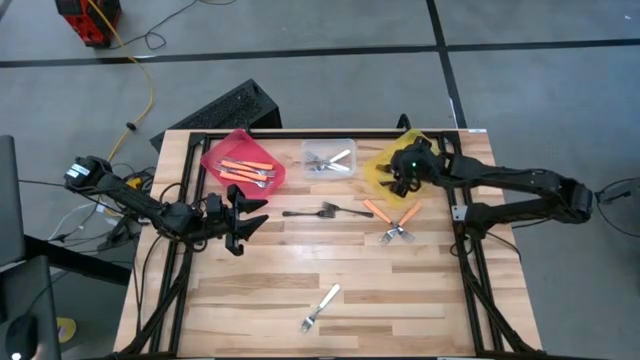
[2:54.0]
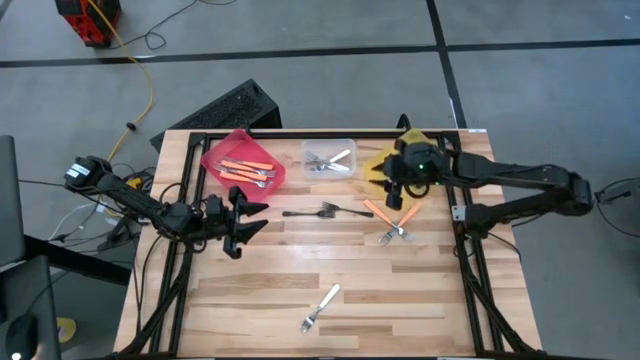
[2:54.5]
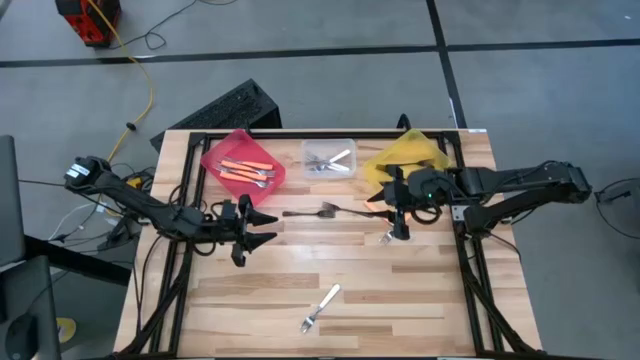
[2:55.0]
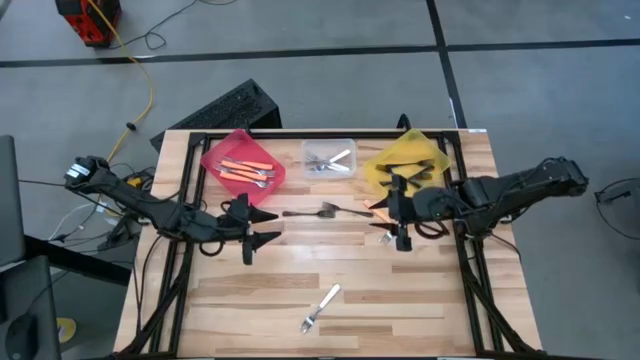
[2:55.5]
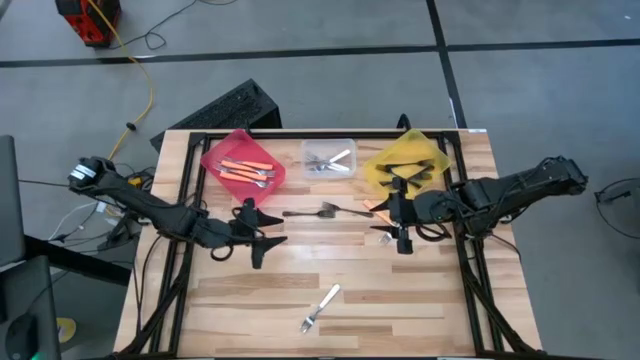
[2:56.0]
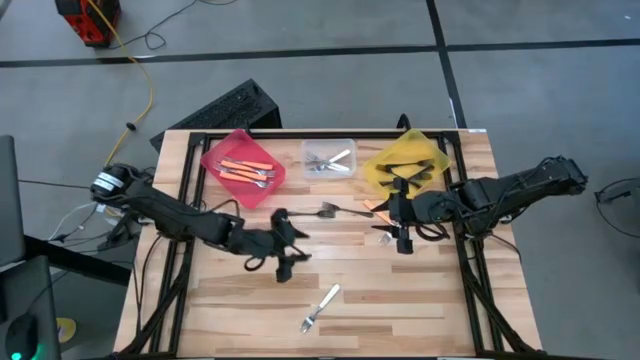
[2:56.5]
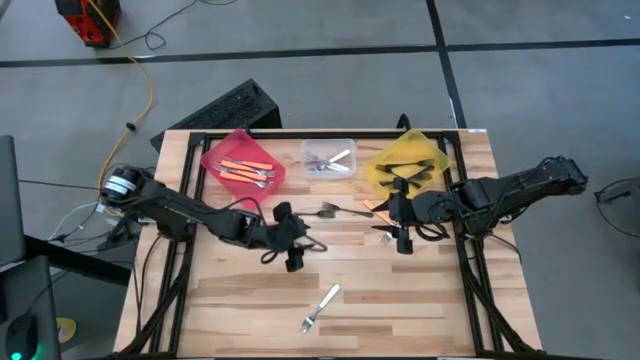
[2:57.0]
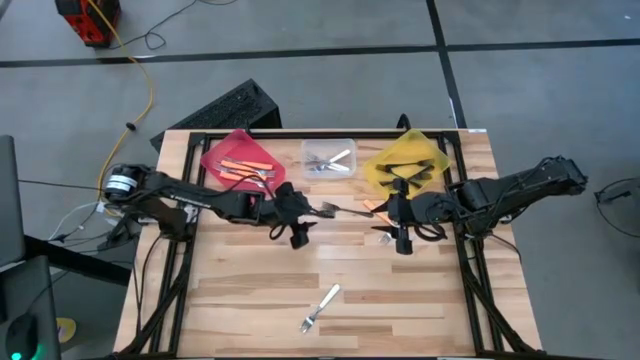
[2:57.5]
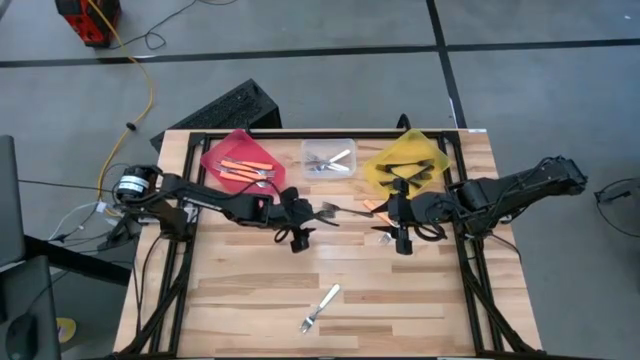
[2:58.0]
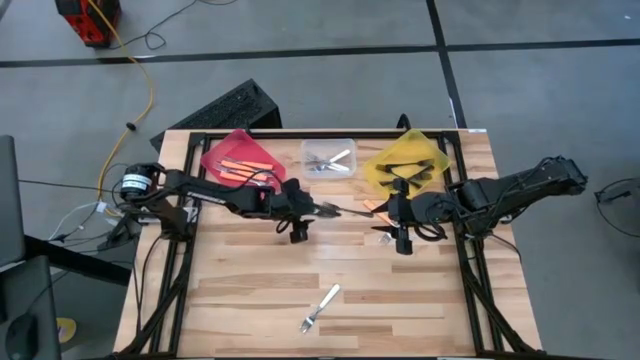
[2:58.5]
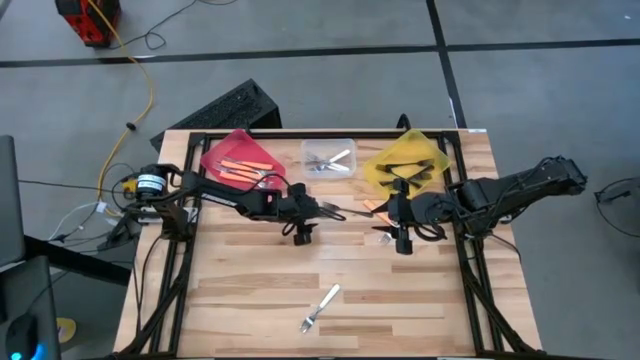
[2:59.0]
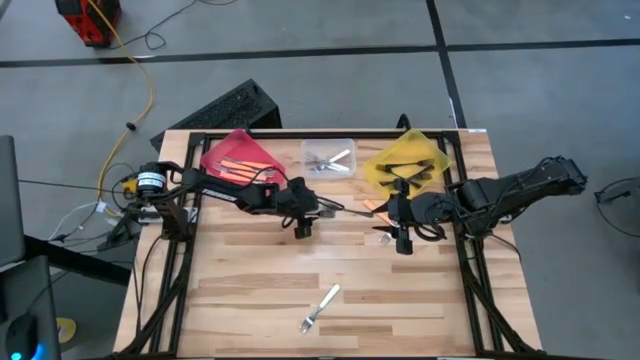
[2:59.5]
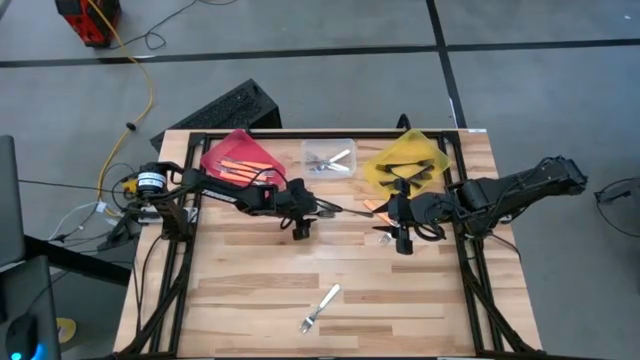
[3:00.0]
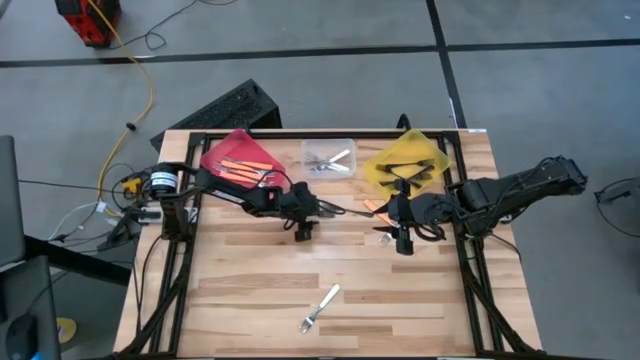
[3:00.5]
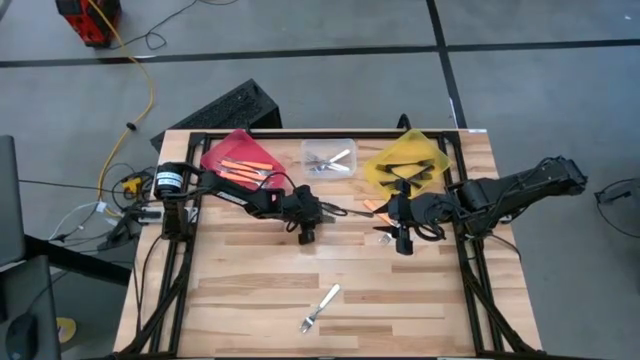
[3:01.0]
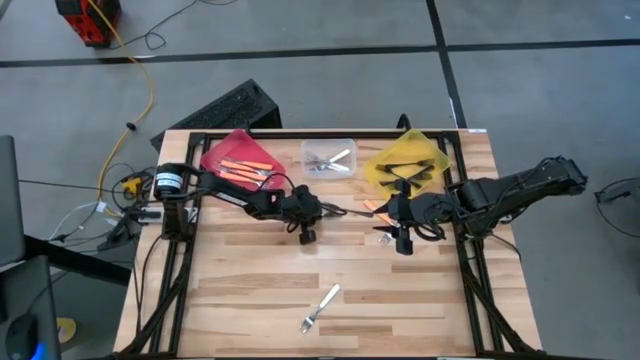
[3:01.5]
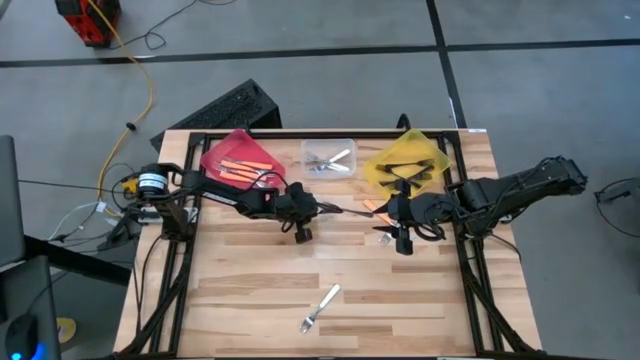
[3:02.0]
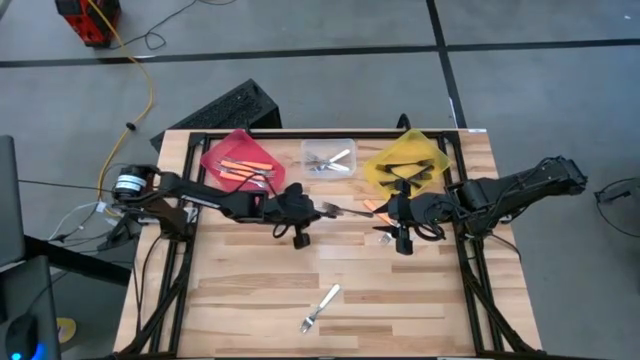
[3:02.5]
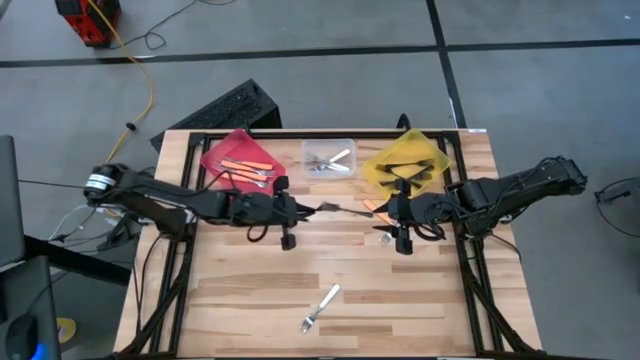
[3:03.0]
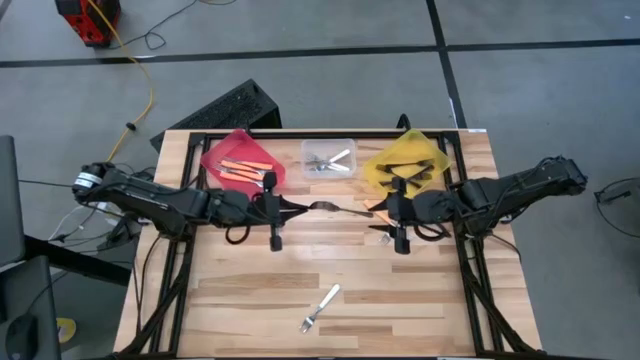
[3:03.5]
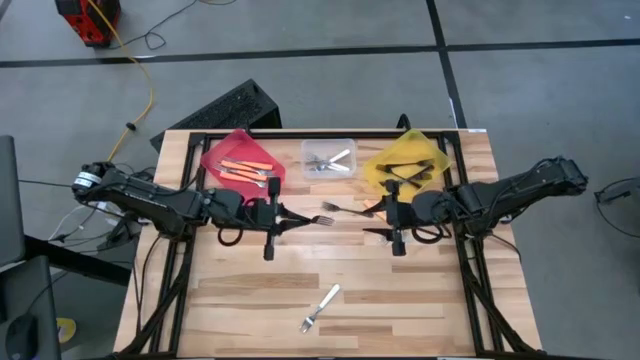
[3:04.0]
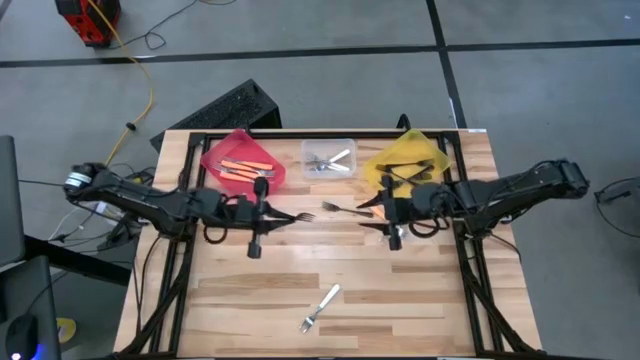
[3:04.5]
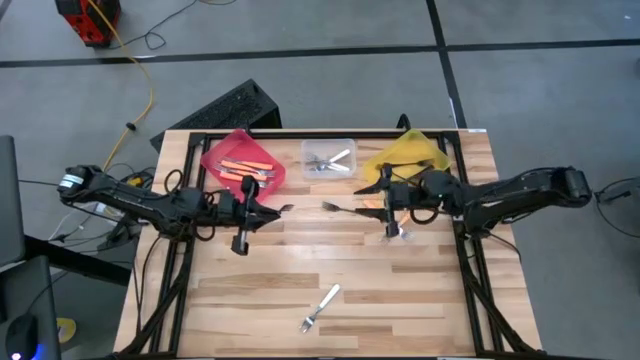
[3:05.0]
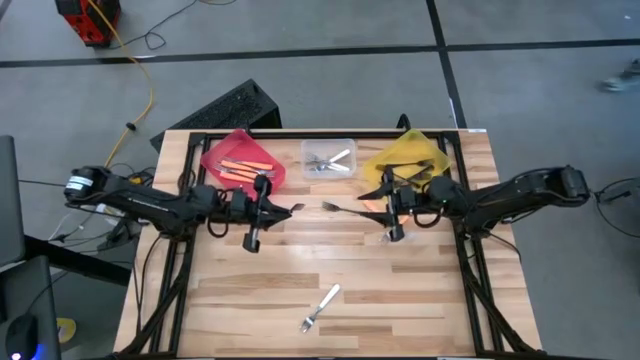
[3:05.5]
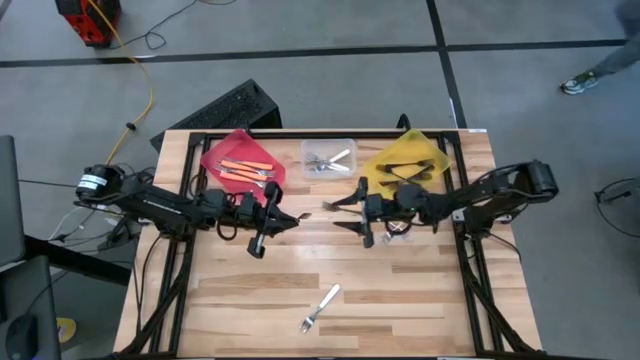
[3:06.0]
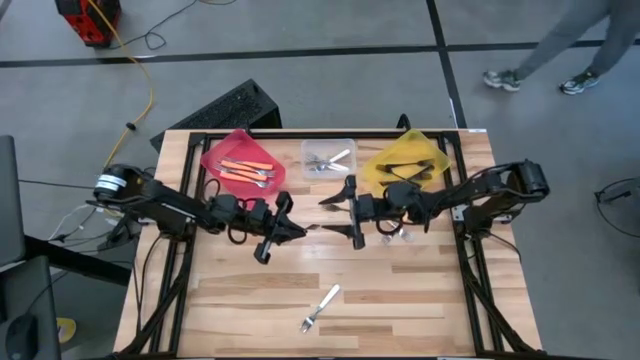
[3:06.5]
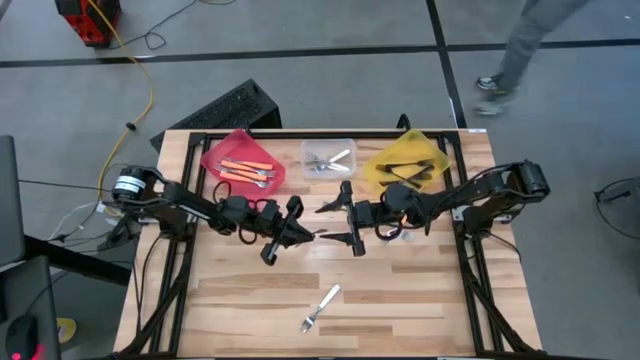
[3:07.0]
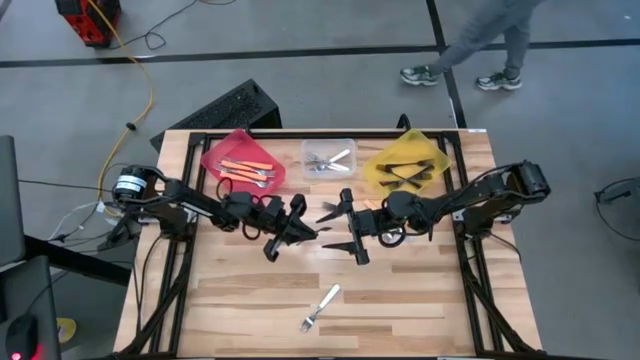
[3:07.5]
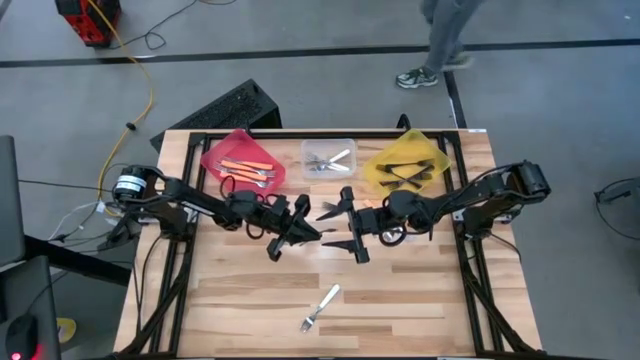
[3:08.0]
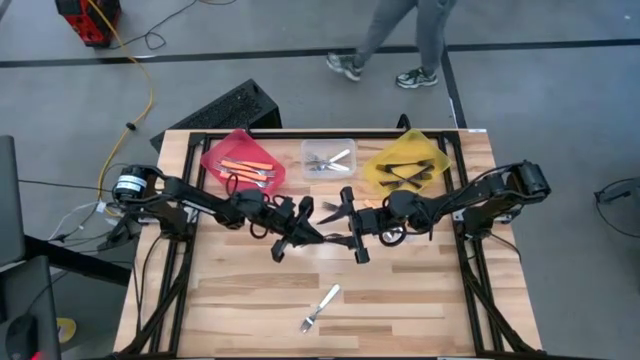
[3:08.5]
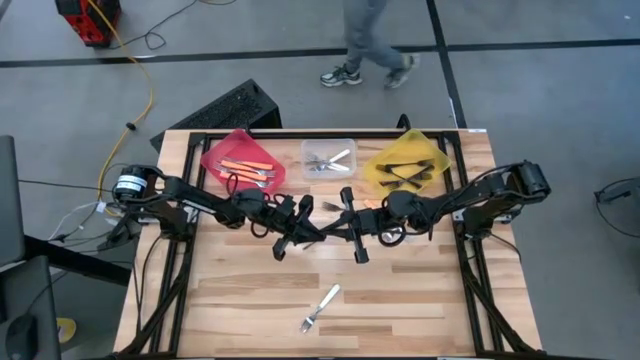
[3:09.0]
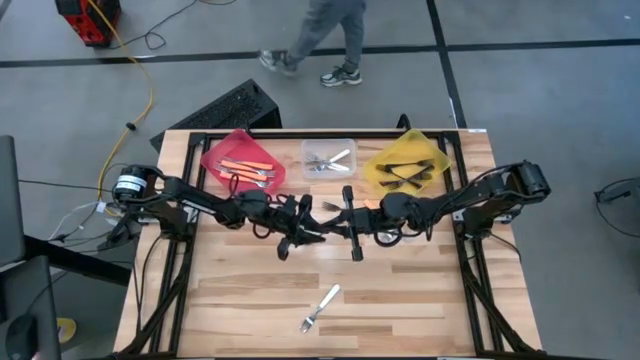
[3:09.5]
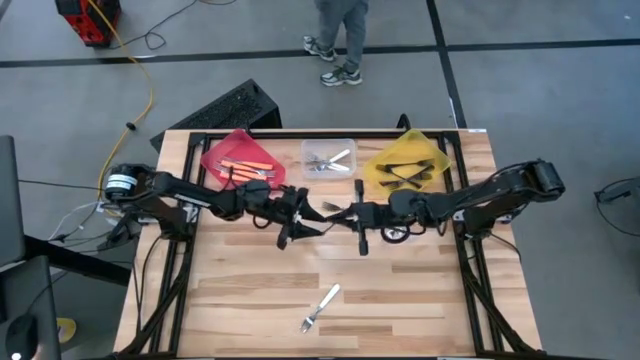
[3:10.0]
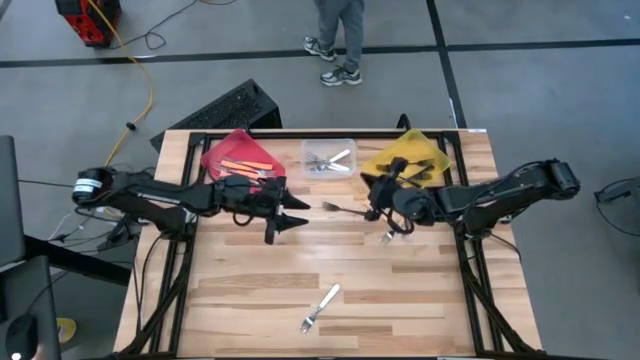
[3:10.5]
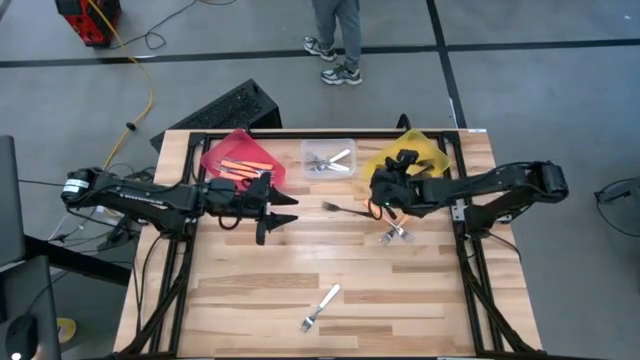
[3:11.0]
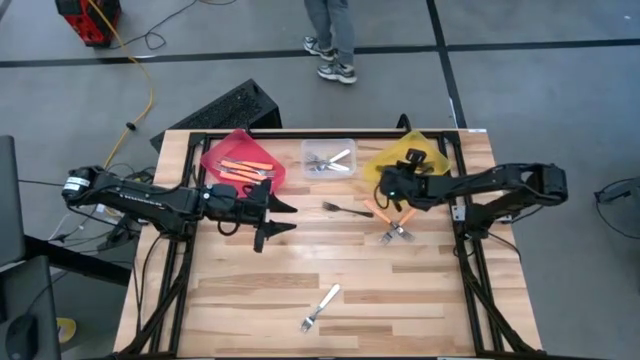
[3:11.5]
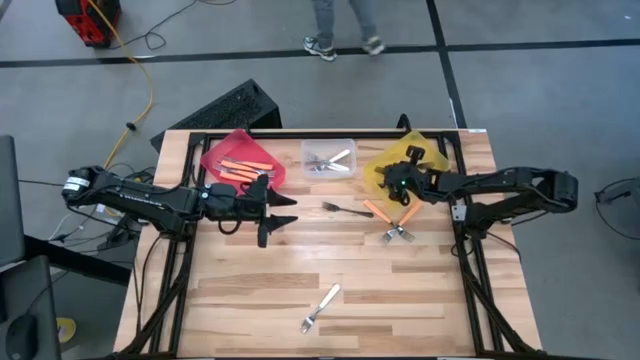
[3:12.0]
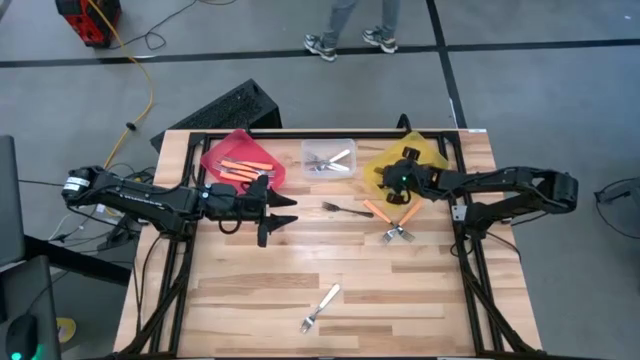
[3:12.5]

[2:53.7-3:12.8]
Task: Sort silverware by color (type)
Put the black fork into the yellow bin

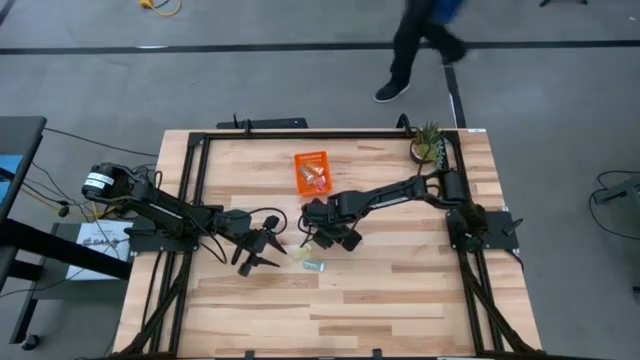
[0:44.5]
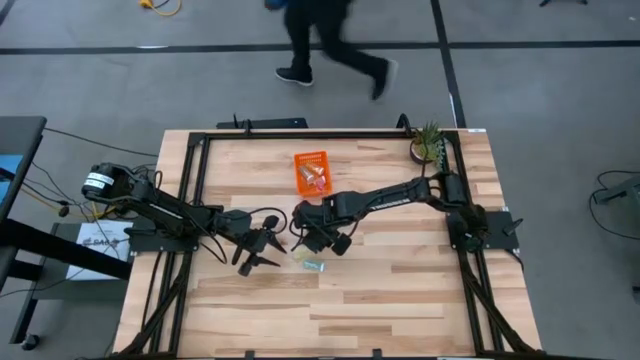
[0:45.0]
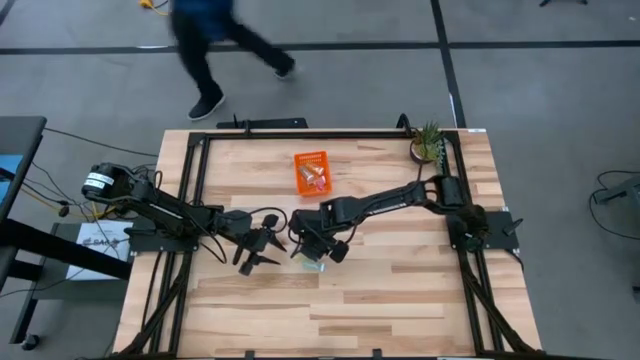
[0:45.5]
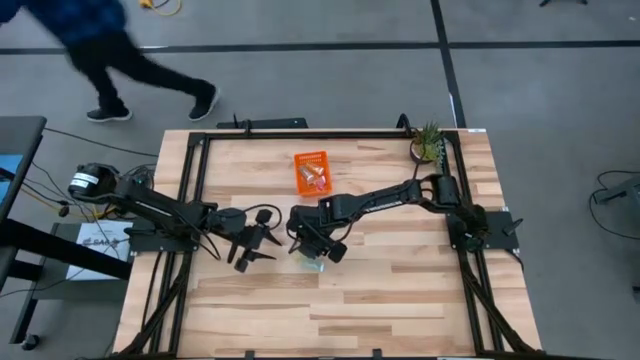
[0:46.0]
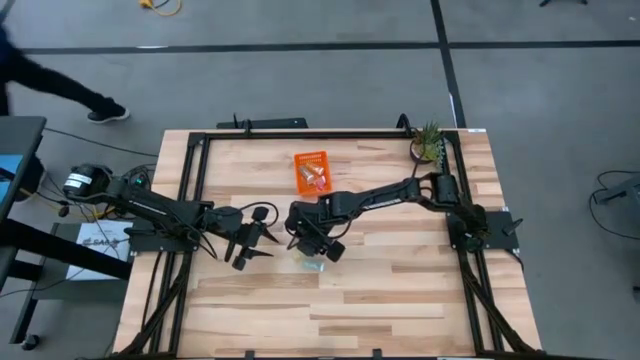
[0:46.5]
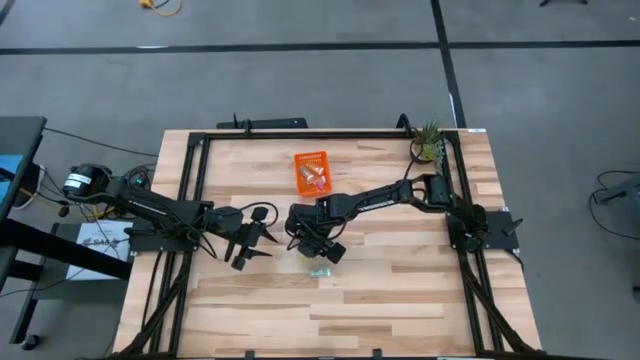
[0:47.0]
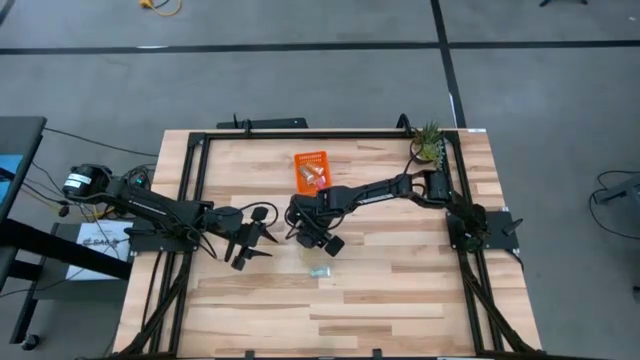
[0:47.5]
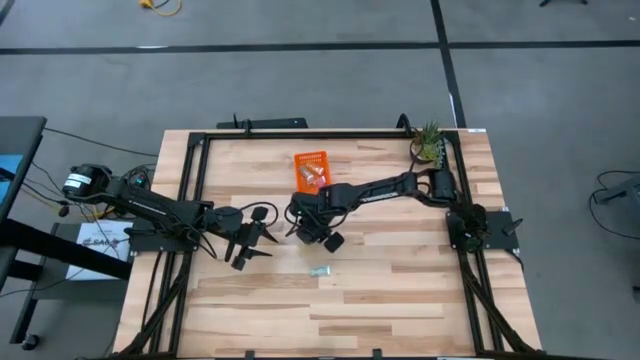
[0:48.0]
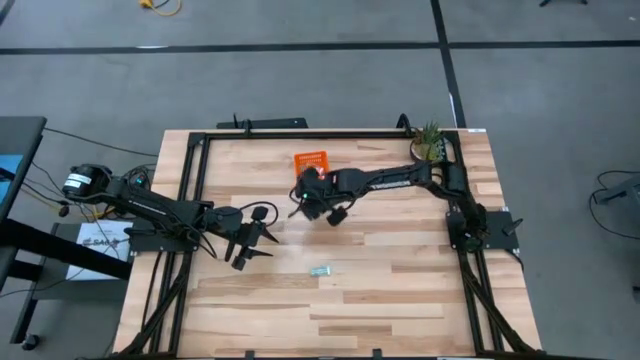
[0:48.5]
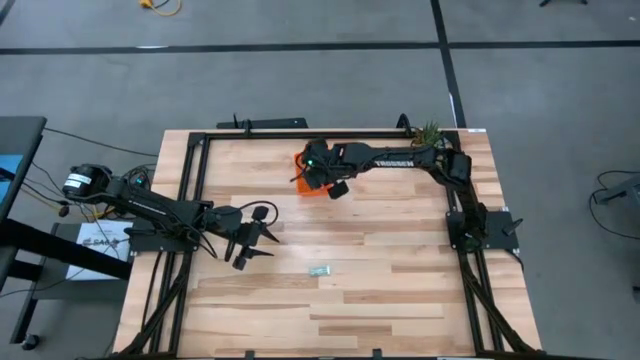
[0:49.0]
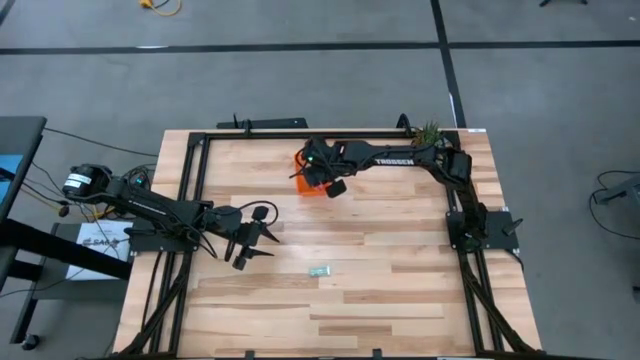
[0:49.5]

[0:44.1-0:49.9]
Task: Pick and place pill bottles into a basket
Put the yellow pill bottle into the orange bin
